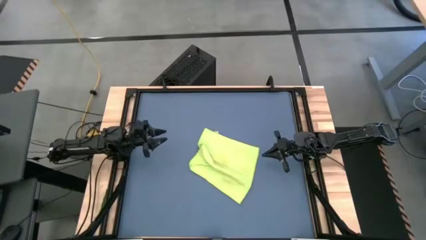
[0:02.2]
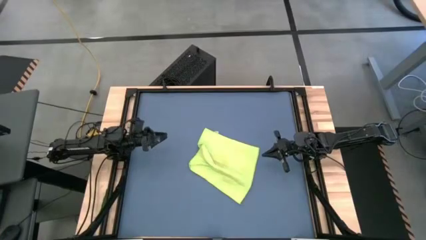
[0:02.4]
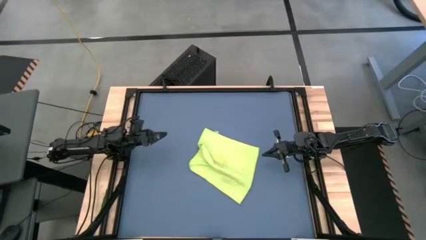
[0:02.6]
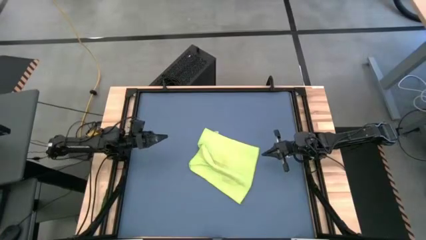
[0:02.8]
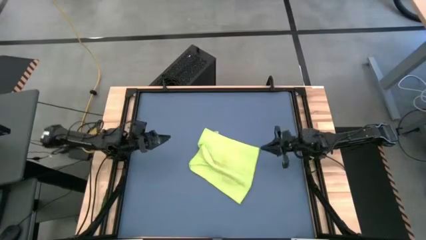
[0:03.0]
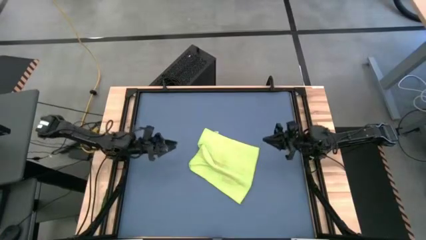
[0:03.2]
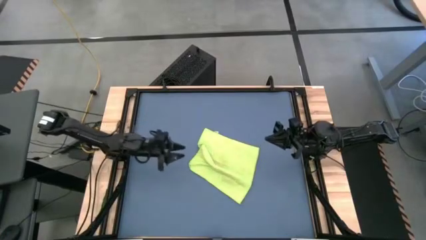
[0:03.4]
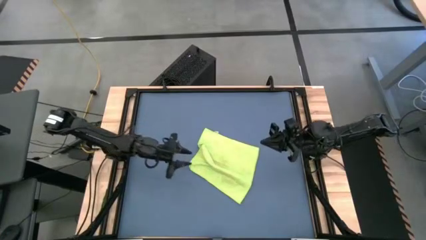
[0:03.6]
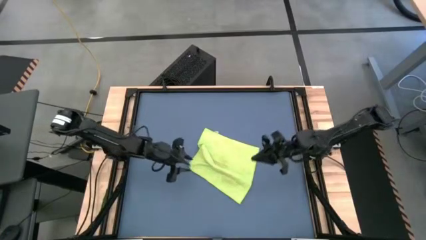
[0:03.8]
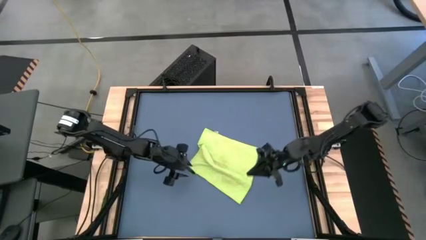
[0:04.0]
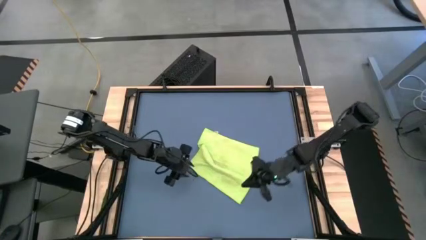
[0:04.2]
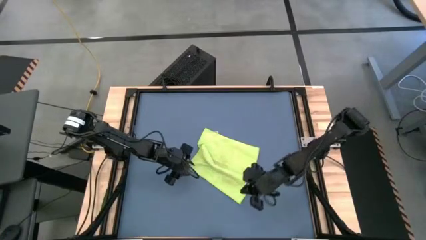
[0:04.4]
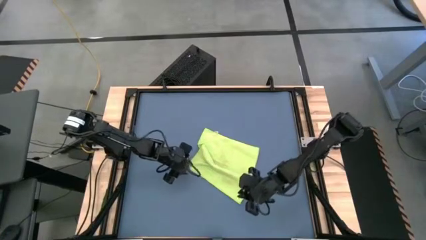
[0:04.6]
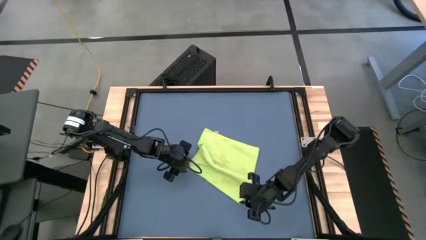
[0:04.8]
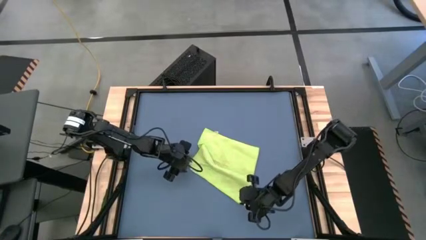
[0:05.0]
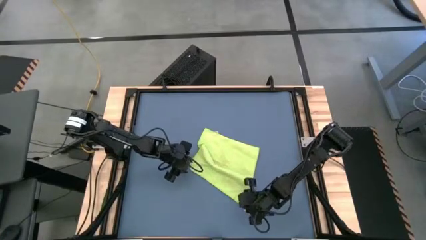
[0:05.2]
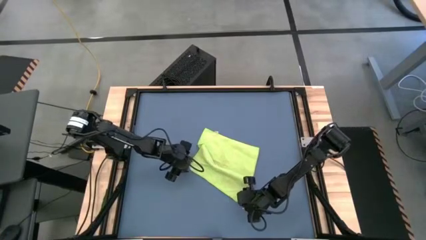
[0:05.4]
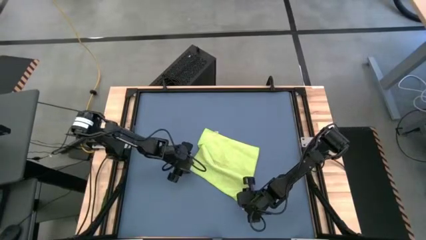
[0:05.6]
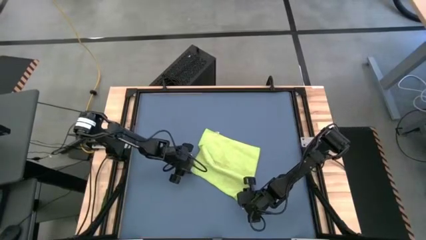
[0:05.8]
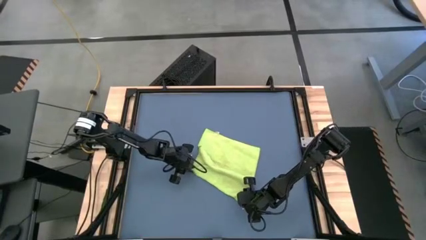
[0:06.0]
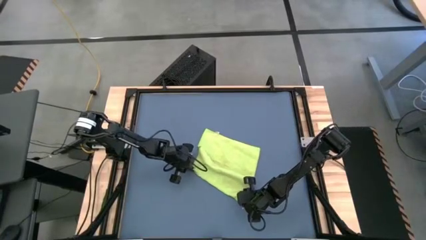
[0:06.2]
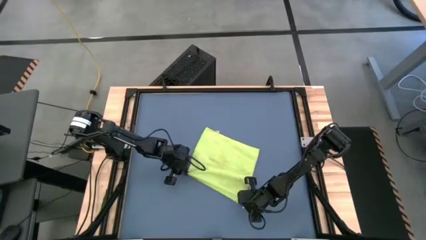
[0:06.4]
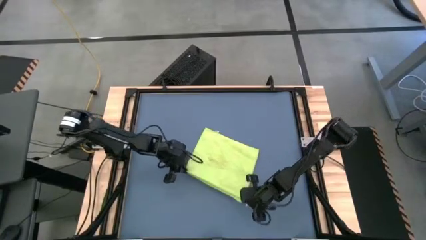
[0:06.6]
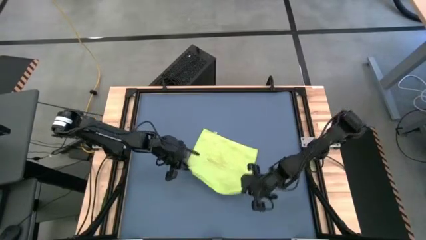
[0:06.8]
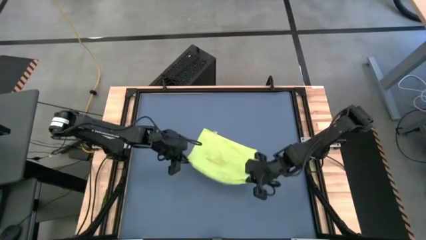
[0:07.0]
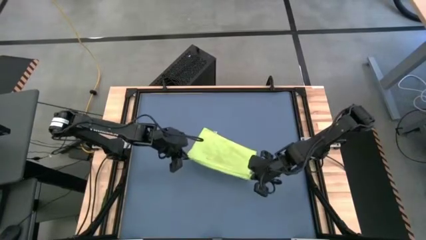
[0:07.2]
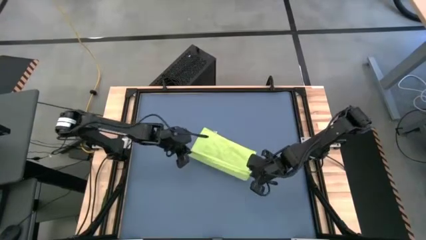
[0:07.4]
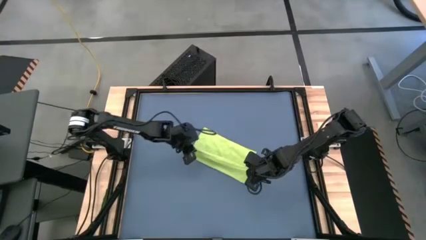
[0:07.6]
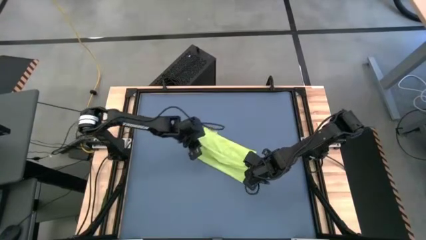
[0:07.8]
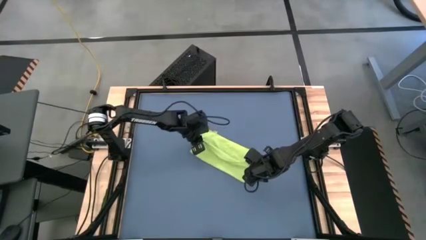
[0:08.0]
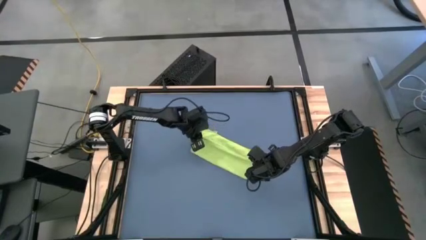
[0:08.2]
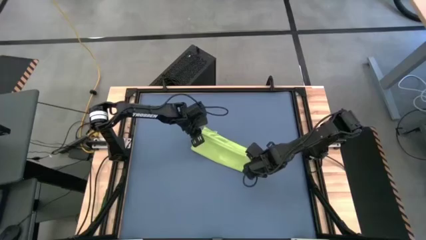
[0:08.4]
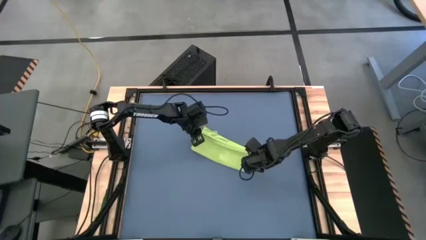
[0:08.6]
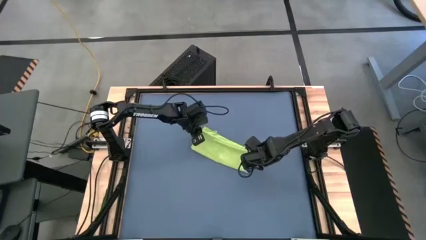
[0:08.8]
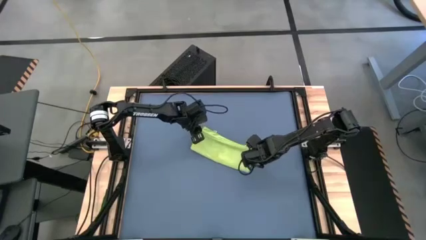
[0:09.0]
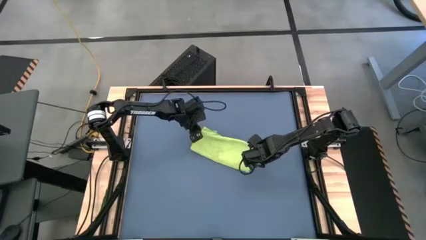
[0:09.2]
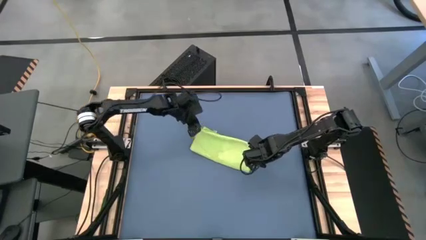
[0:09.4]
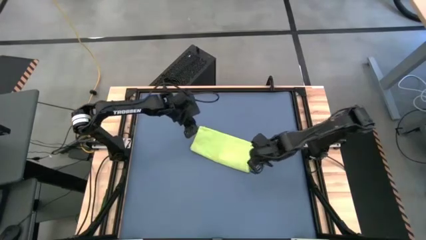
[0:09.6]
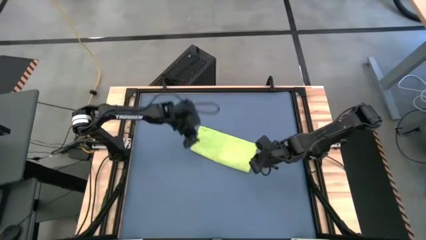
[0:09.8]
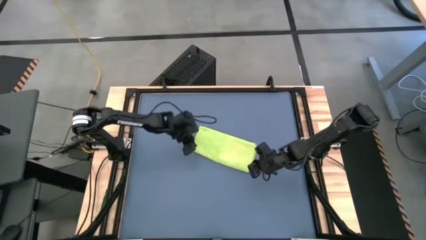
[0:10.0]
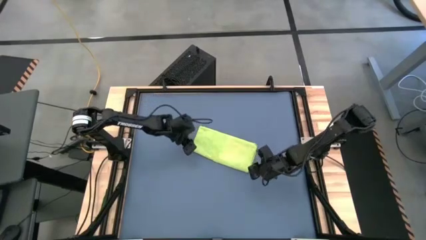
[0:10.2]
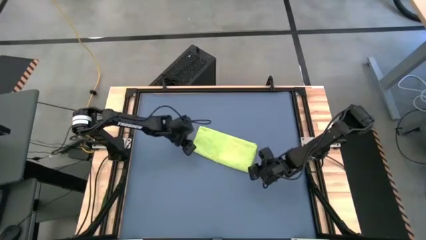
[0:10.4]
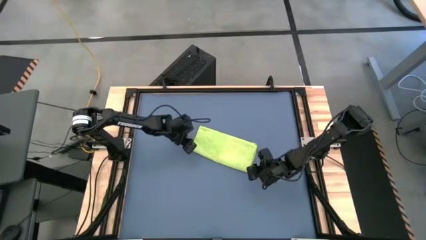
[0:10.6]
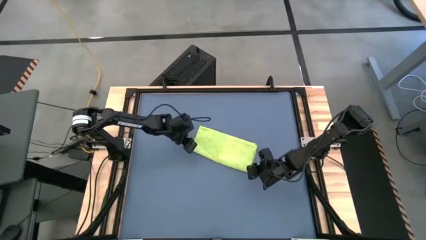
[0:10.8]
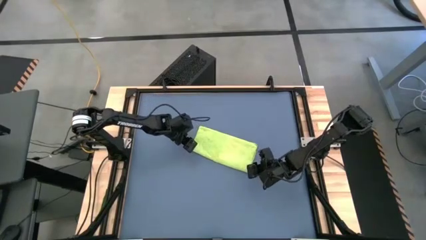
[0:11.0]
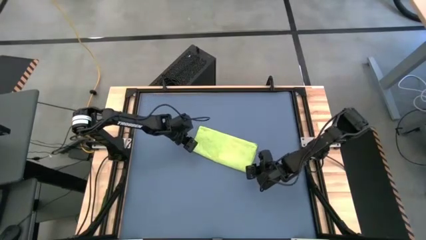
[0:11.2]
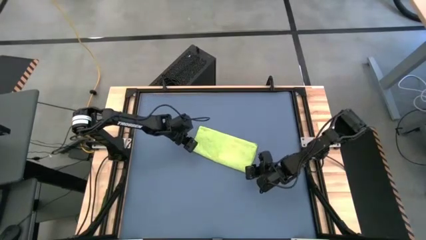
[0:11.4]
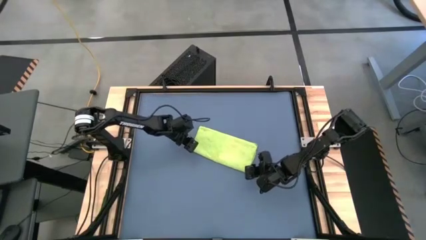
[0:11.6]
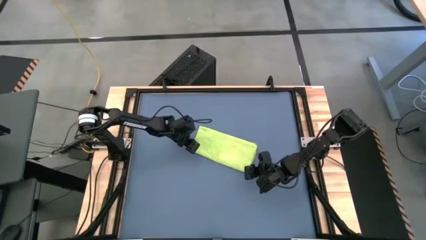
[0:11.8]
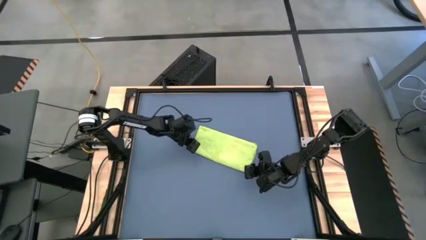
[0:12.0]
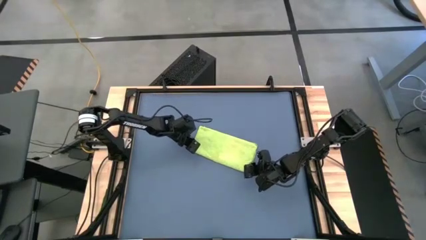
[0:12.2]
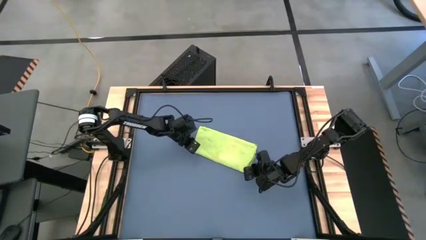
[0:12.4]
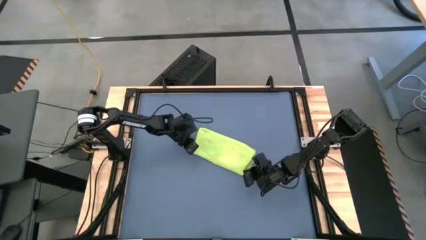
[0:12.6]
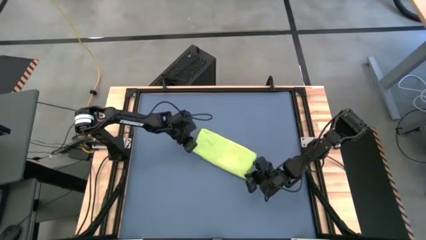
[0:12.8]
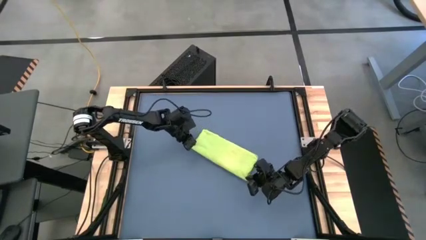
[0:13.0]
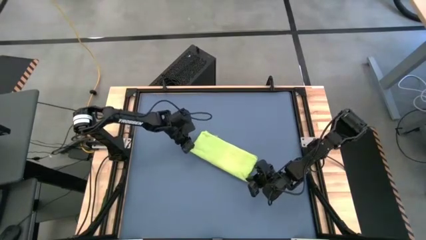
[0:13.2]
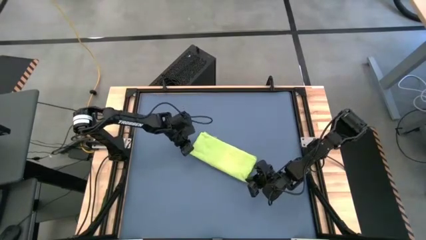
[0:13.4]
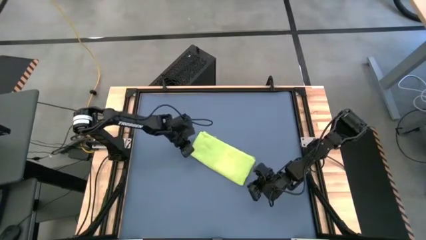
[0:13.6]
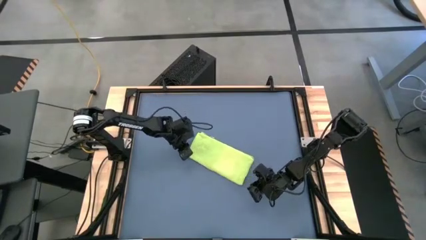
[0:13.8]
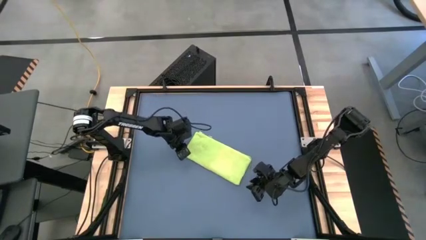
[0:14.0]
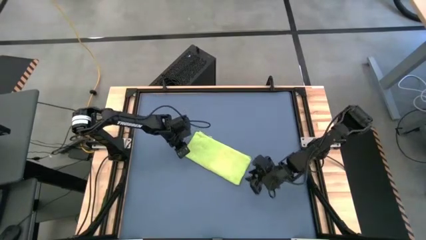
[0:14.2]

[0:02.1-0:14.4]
Task: Roll towel
Fold the green towel
